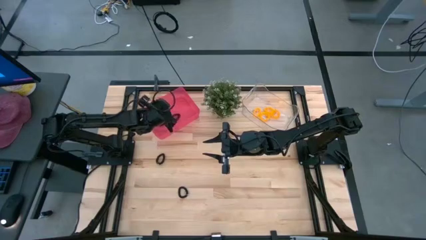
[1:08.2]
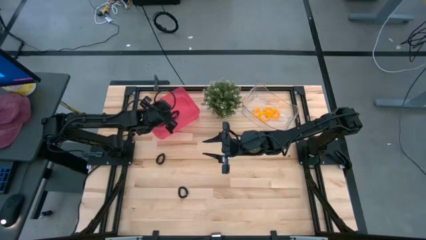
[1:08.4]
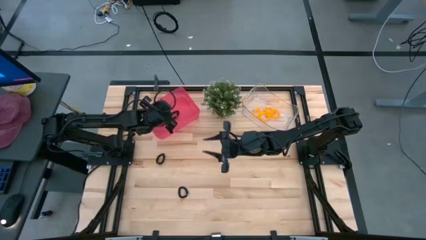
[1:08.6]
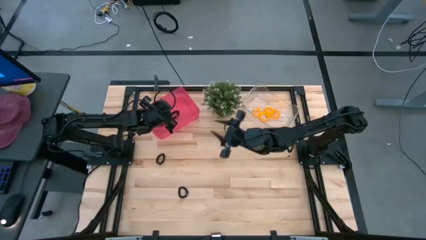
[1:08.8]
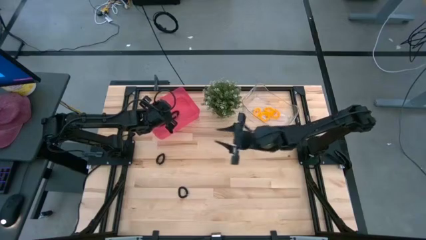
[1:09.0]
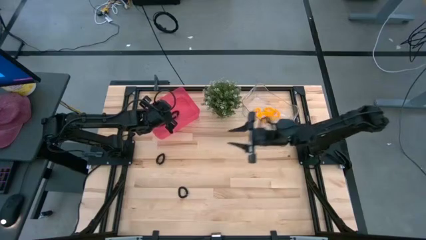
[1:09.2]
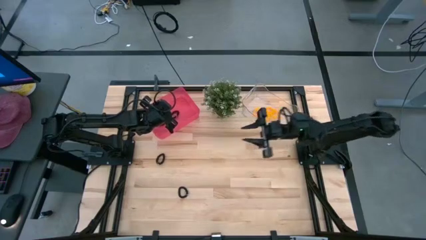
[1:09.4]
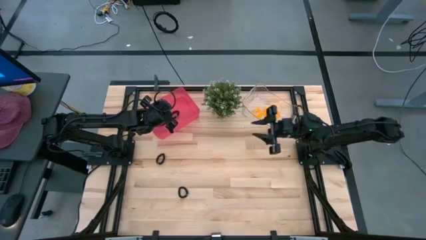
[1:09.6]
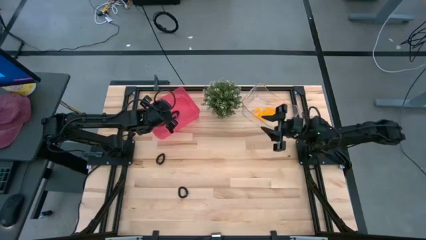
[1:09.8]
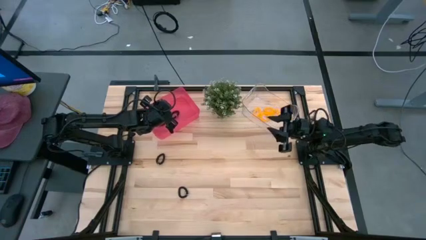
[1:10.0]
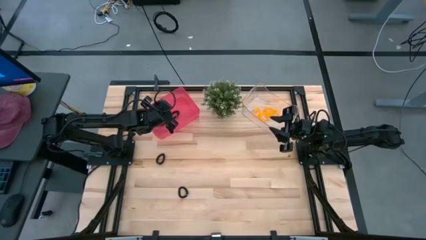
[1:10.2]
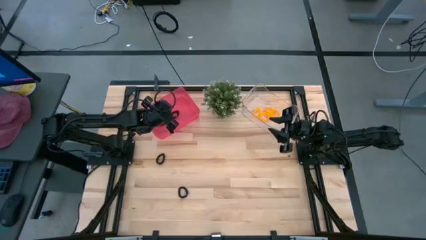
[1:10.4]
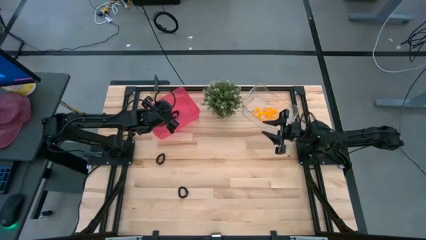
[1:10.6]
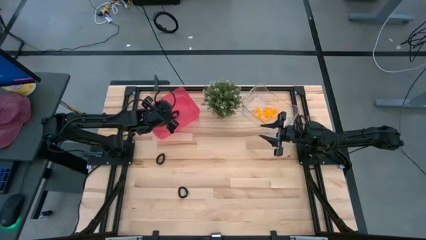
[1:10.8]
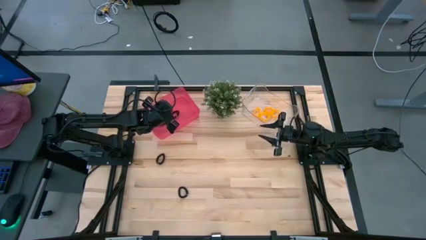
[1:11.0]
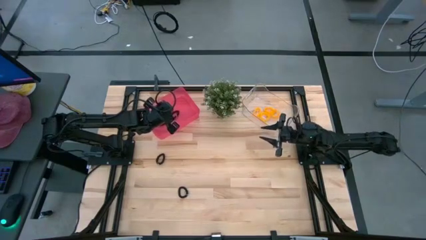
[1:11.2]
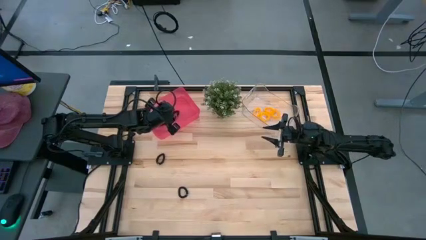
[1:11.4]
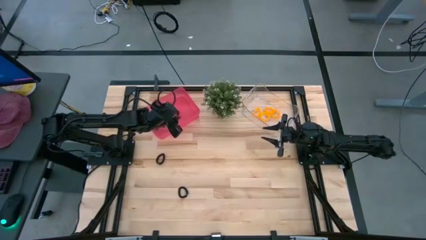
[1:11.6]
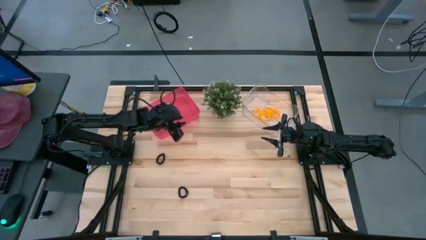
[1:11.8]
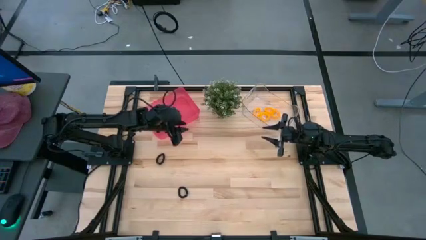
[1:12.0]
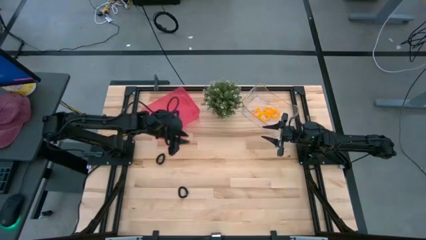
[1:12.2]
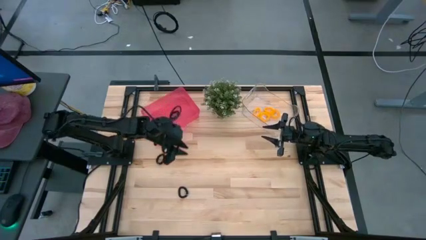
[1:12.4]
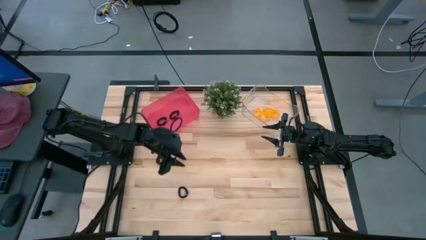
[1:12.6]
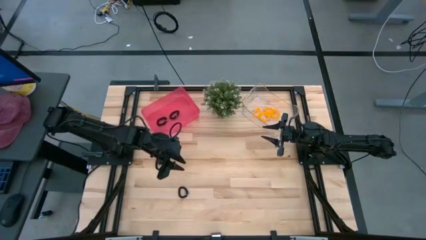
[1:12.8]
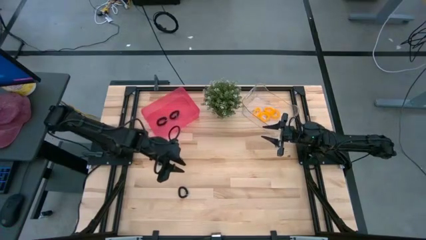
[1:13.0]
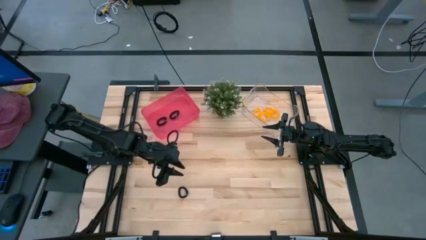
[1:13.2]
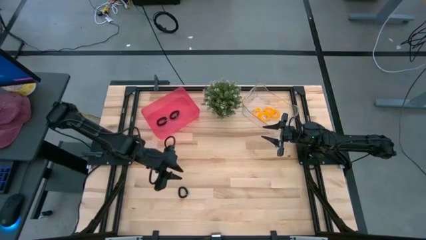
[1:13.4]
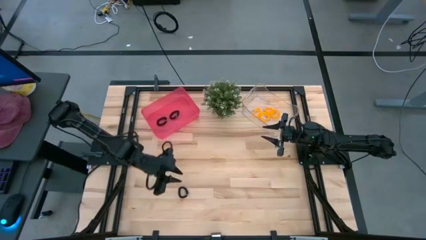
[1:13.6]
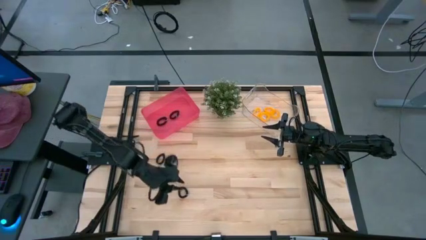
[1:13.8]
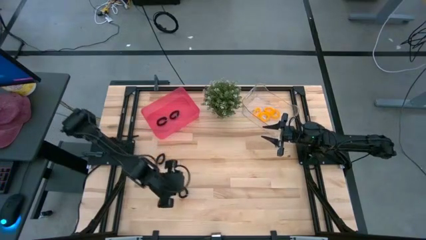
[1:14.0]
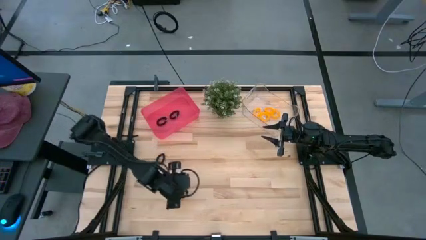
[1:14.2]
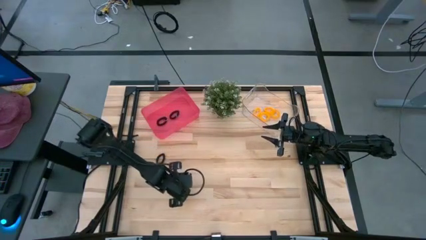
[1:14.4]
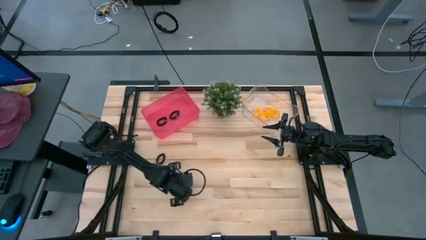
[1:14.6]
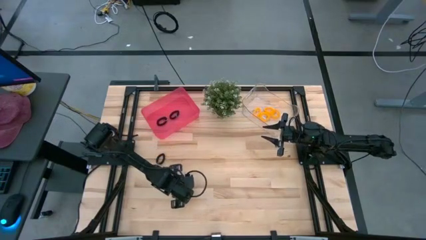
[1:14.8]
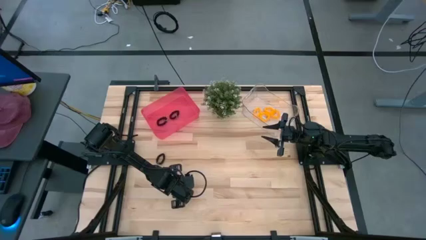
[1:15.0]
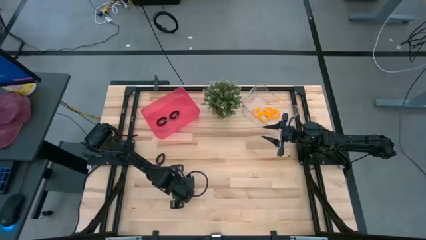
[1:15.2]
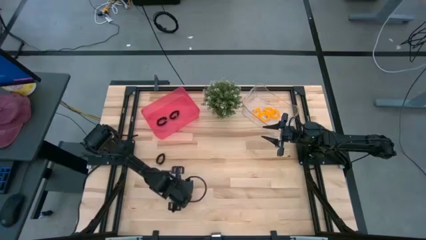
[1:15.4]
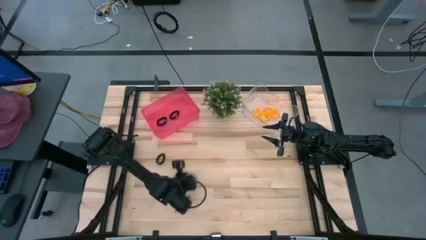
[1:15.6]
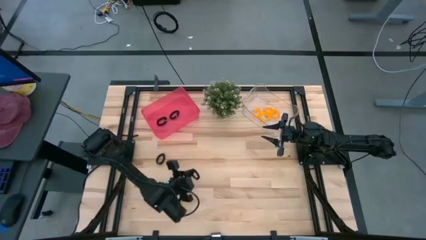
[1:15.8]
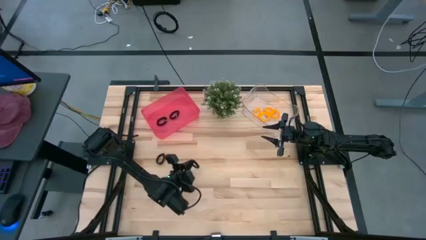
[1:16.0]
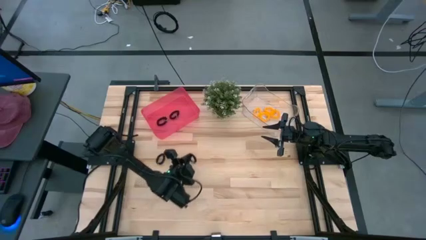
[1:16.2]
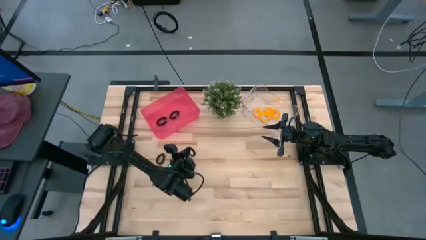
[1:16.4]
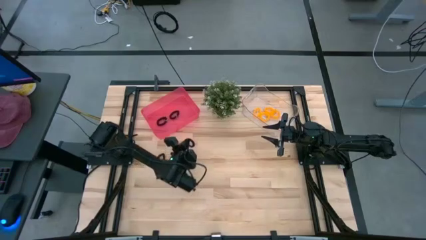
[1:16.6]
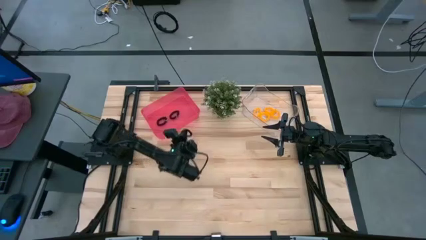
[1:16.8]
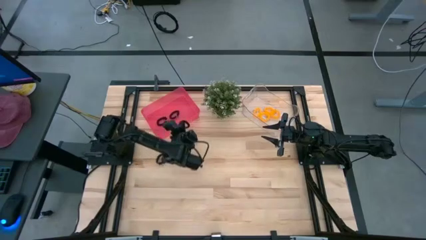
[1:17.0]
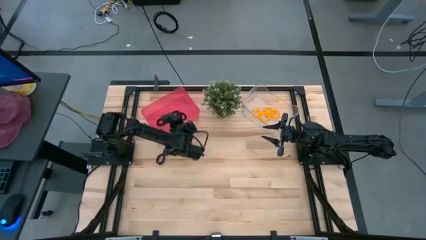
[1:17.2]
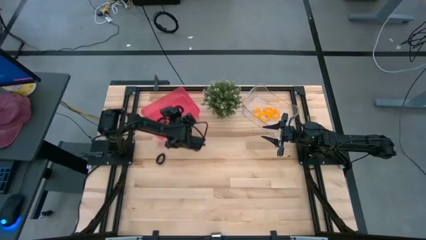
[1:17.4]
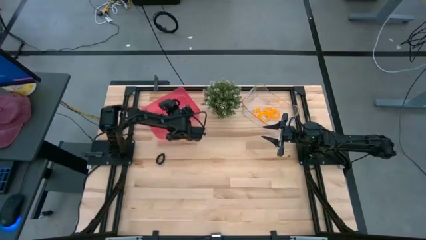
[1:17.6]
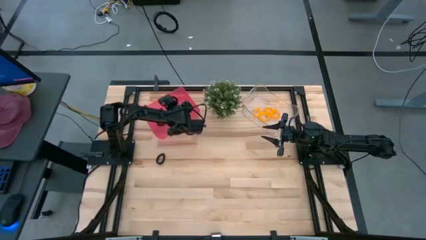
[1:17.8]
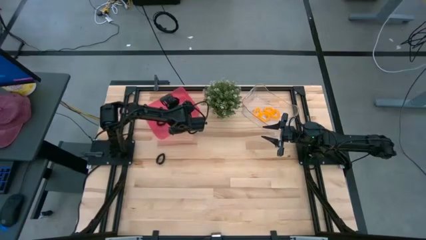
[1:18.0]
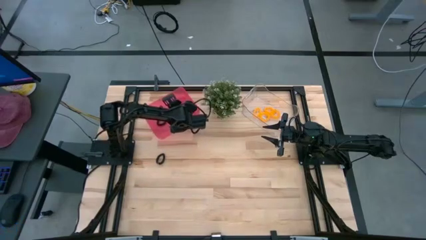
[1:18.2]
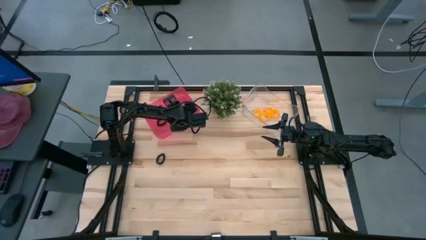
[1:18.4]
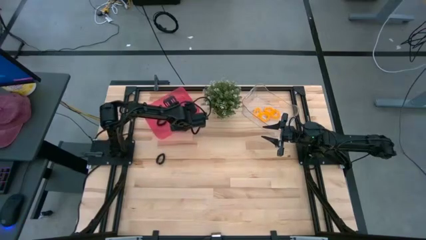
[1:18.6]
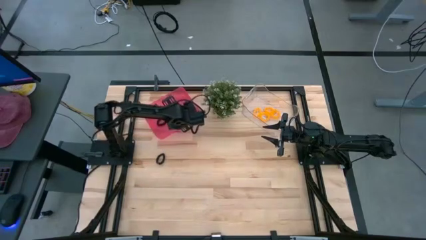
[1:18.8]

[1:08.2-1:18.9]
Task: Sort spring keychains
Put the black spring keychain into the pink bin

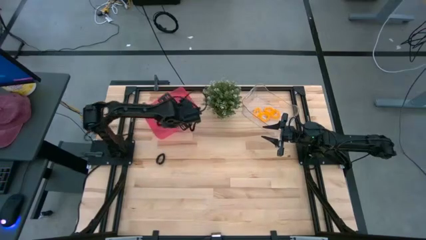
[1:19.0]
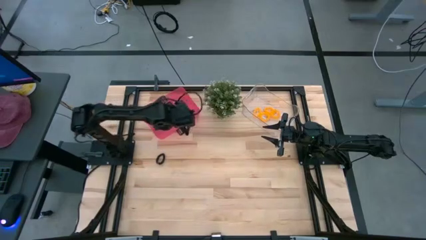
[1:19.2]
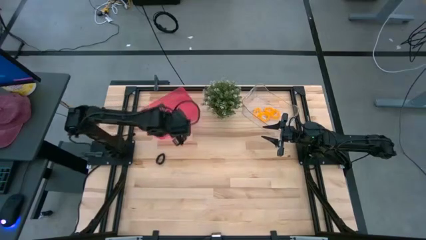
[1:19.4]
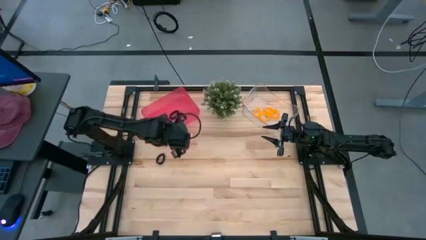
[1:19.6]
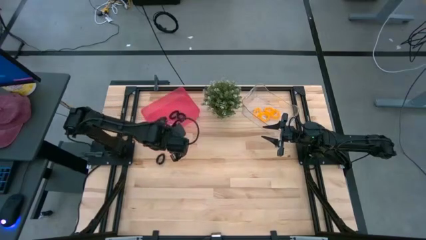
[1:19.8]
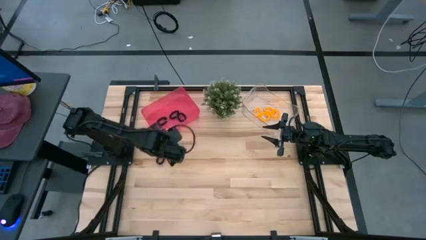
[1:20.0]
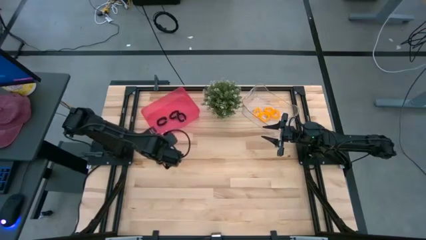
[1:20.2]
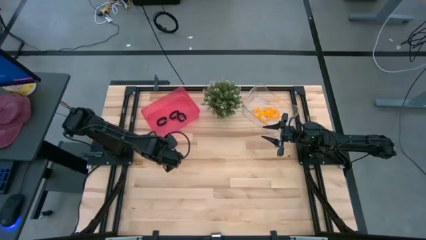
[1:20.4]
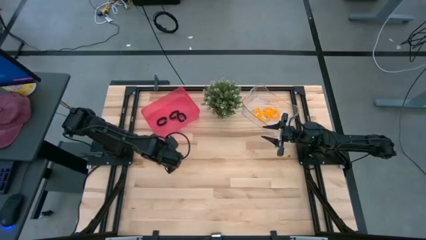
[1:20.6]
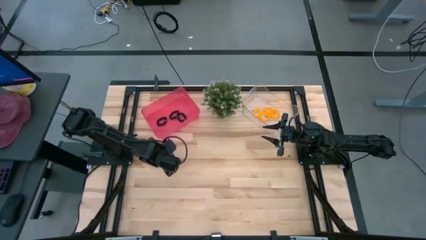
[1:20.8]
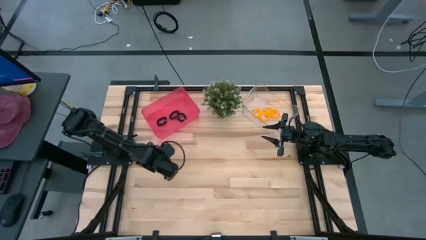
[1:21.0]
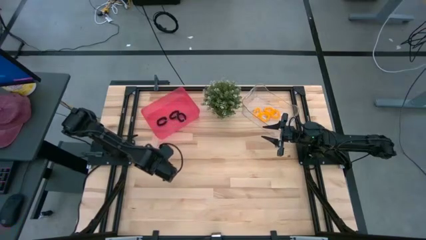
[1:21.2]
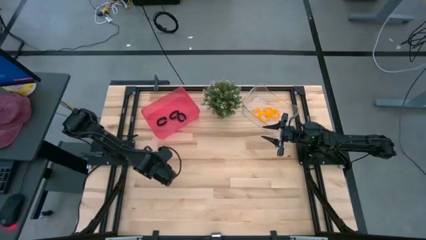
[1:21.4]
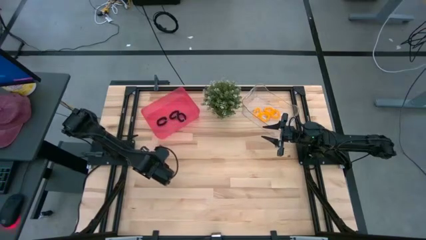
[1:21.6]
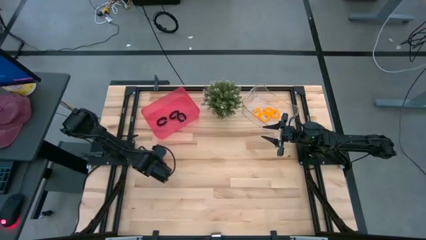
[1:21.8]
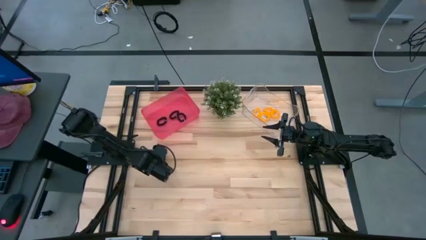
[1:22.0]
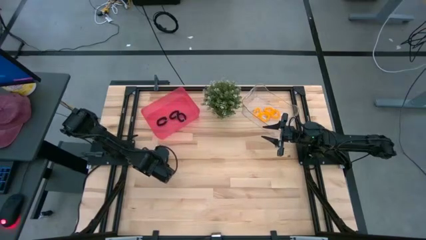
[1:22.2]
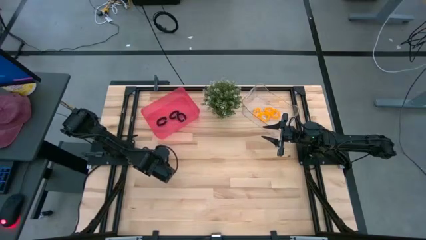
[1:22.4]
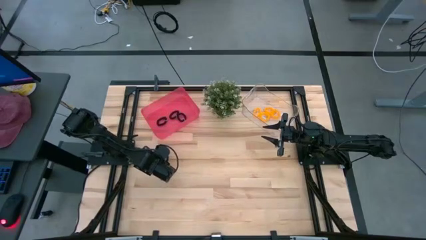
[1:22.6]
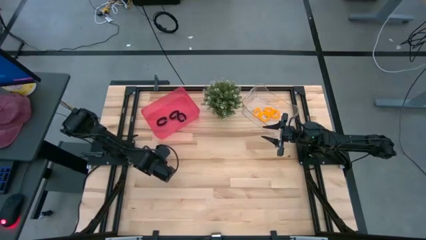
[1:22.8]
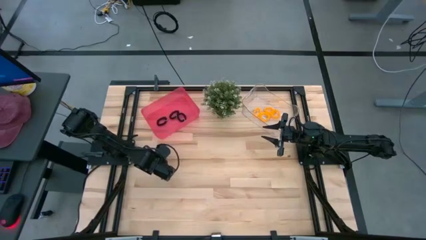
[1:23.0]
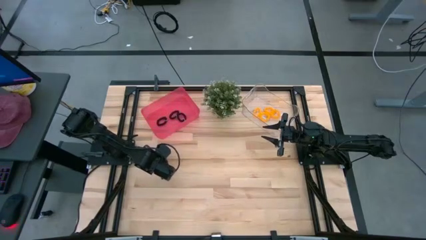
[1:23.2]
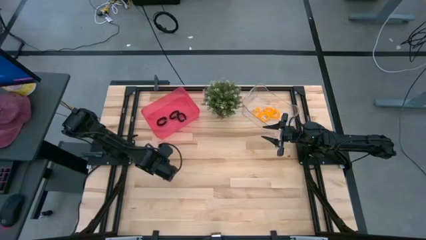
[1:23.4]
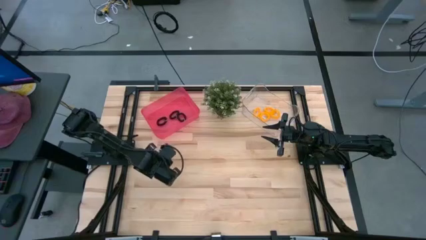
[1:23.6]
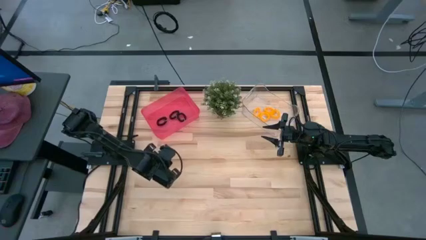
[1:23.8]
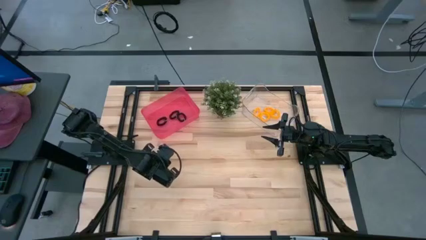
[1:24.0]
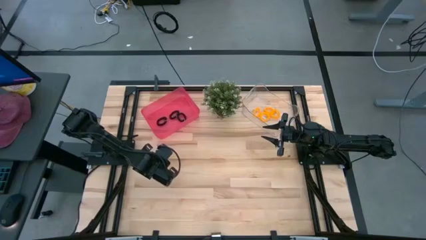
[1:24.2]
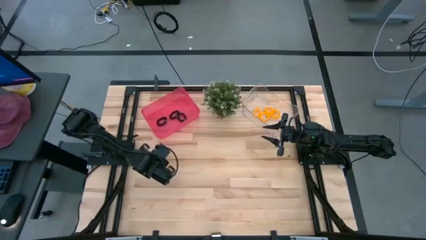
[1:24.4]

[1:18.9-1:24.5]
Put the black spring keychain into the pink bin

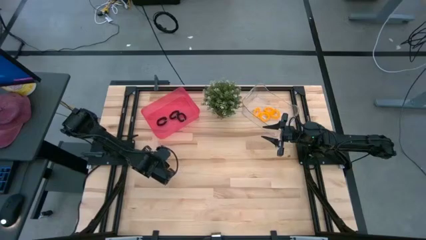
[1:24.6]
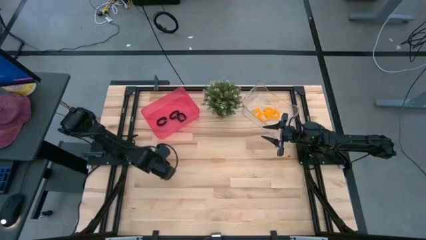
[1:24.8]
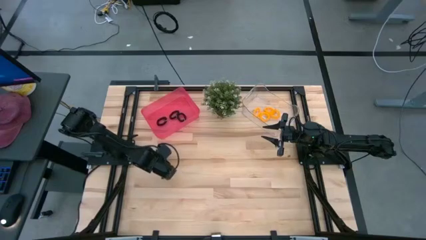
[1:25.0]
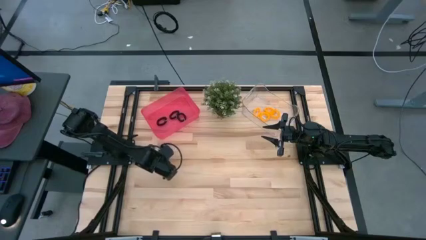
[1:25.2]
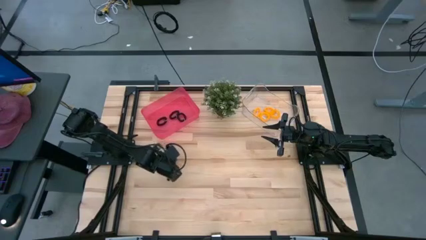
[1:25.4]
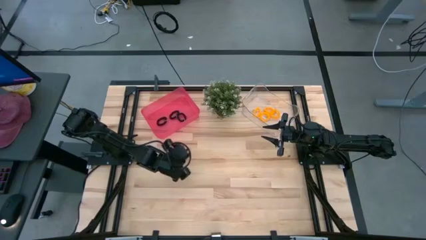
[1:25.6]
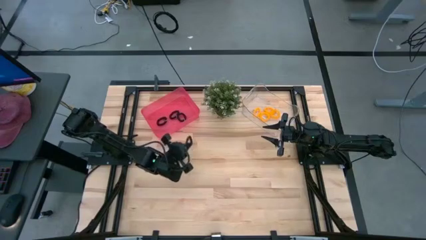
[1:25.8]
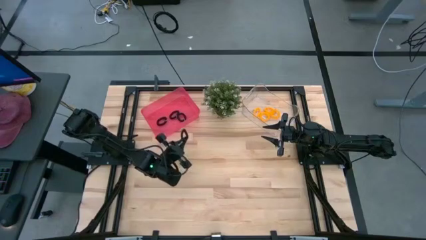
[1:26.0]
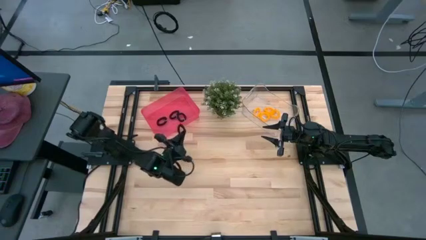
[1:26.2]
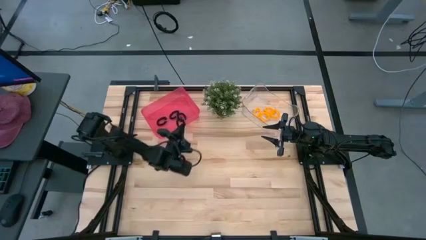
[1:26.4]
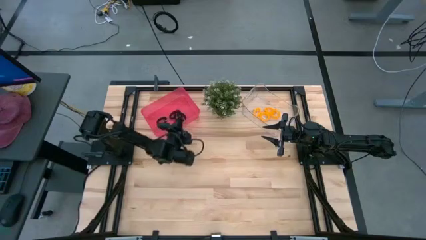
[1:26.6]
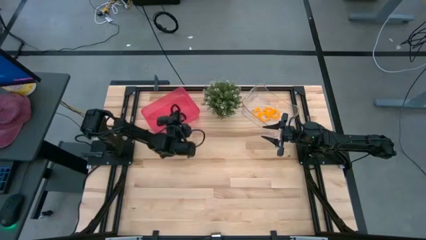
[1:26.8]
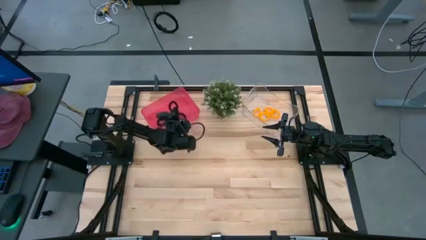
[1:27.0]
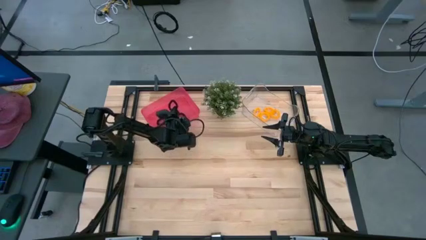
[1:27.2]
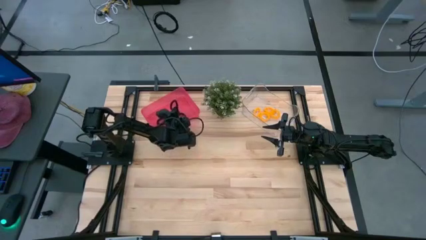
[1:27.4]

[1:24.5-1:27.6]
Put the black spring keychain into the pink bin
